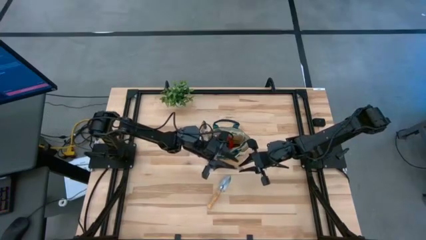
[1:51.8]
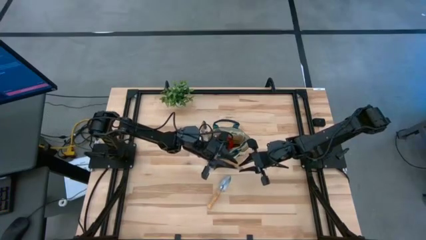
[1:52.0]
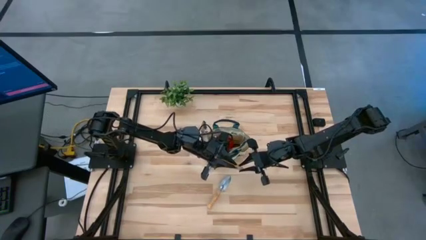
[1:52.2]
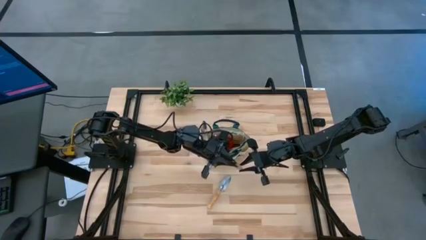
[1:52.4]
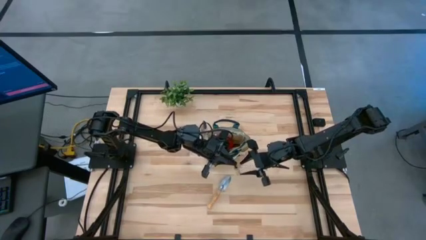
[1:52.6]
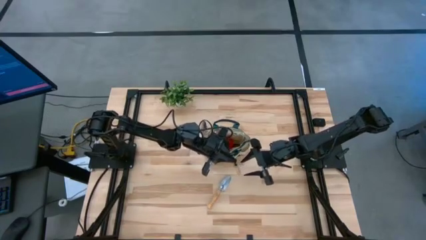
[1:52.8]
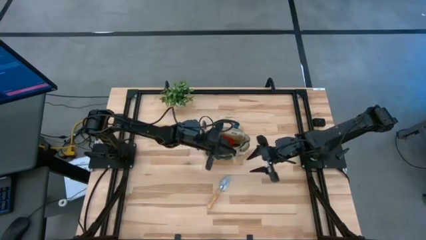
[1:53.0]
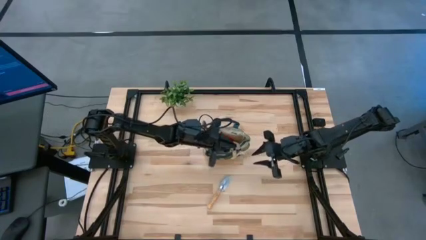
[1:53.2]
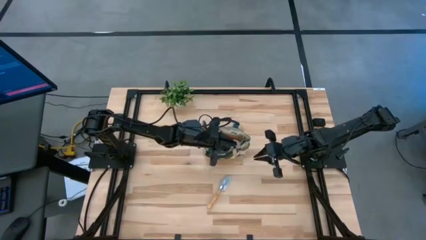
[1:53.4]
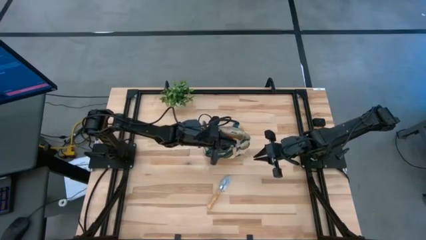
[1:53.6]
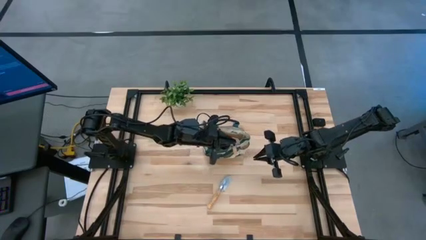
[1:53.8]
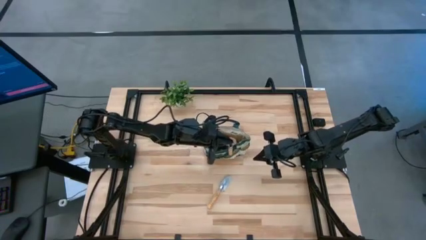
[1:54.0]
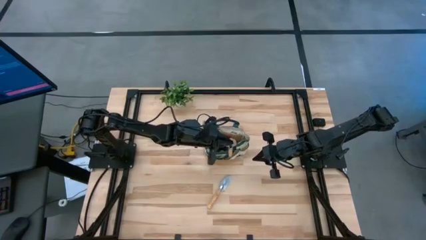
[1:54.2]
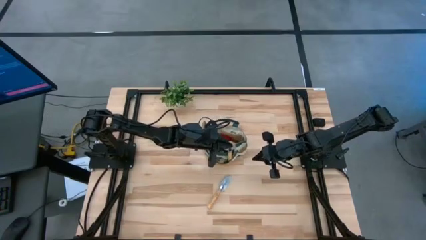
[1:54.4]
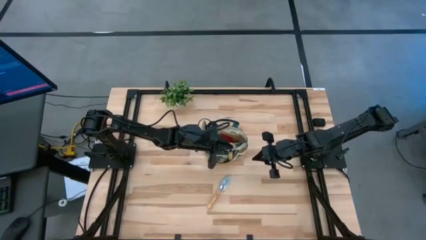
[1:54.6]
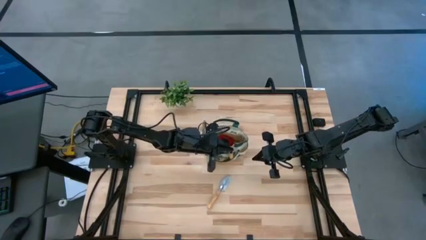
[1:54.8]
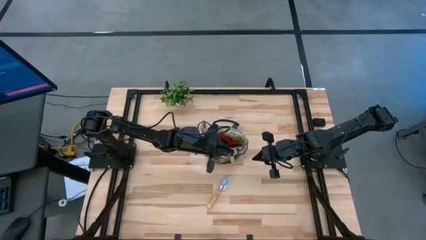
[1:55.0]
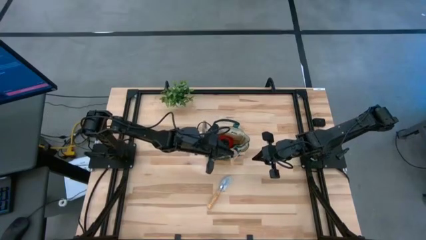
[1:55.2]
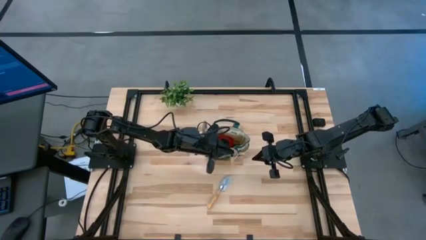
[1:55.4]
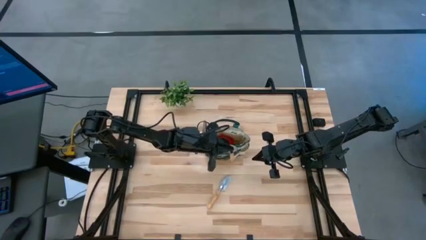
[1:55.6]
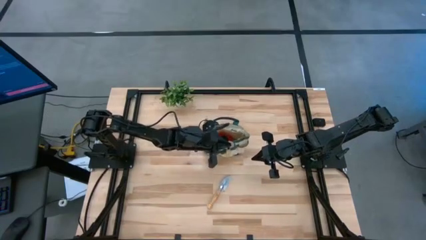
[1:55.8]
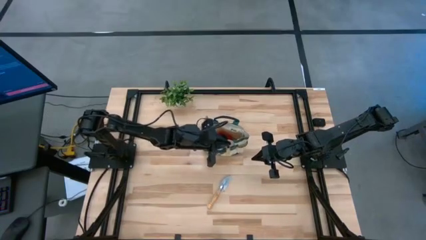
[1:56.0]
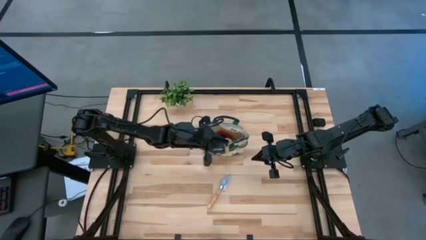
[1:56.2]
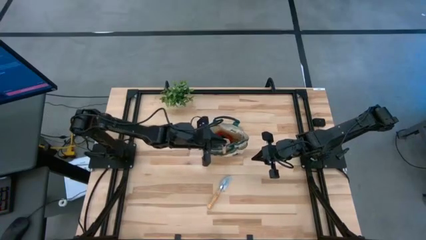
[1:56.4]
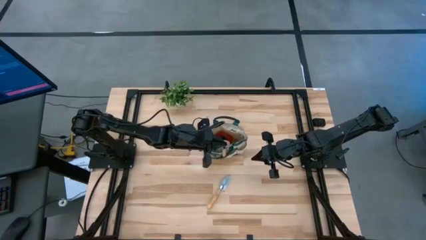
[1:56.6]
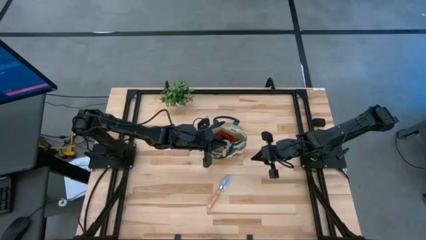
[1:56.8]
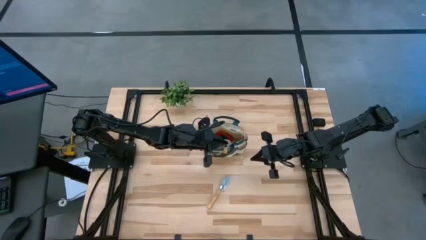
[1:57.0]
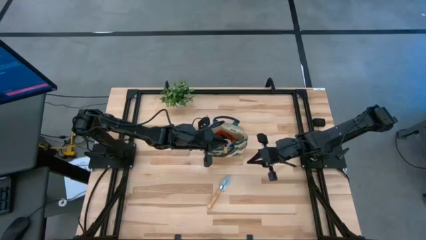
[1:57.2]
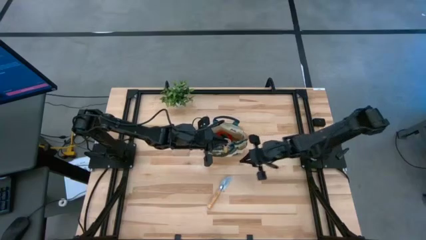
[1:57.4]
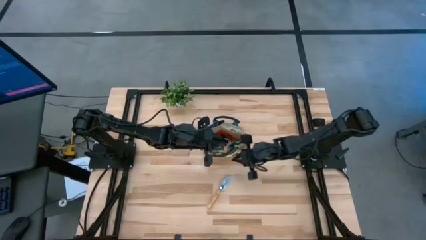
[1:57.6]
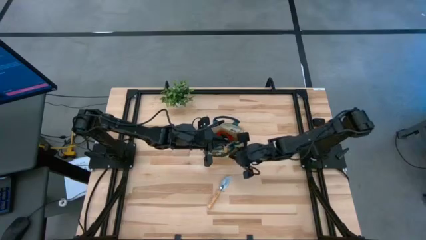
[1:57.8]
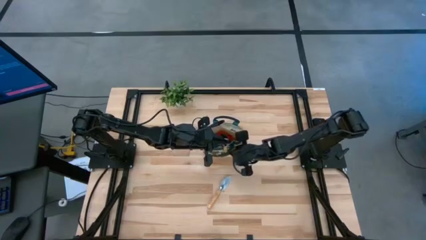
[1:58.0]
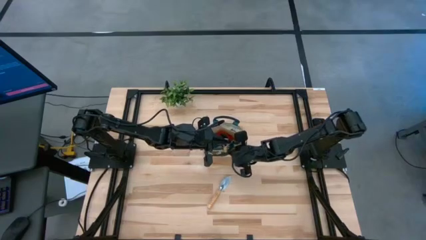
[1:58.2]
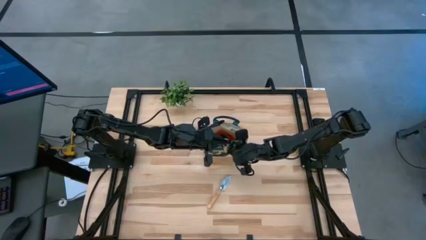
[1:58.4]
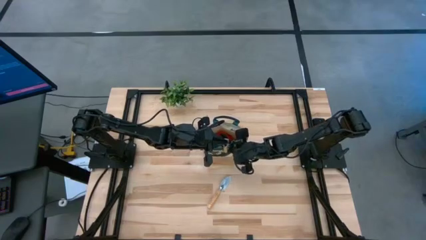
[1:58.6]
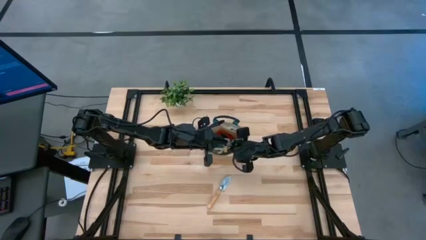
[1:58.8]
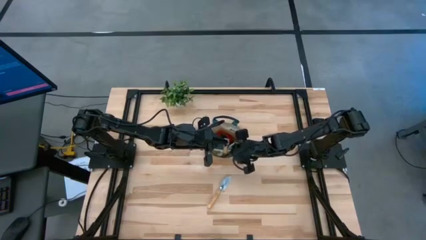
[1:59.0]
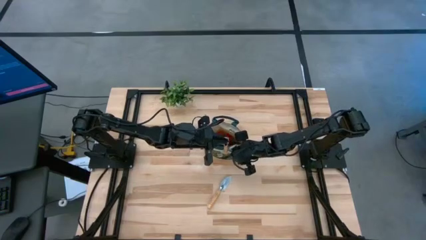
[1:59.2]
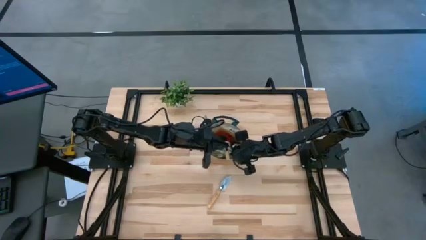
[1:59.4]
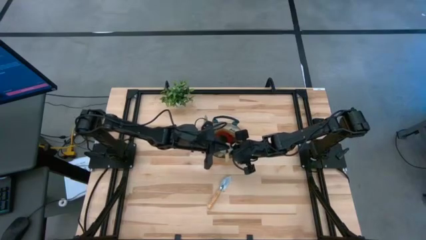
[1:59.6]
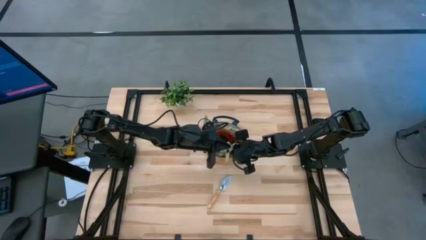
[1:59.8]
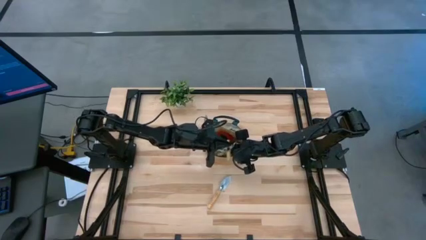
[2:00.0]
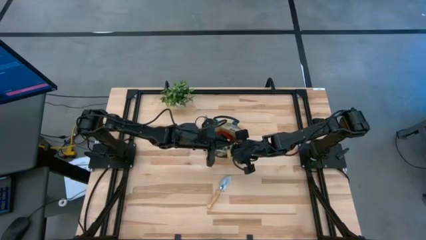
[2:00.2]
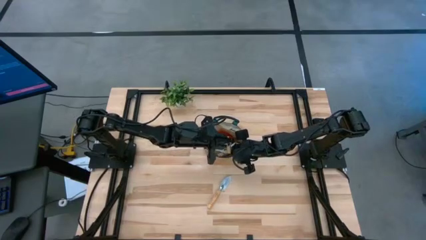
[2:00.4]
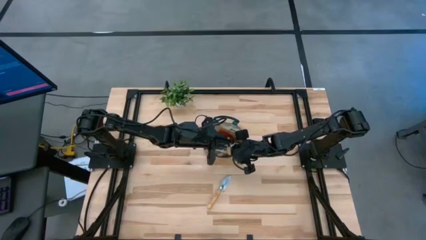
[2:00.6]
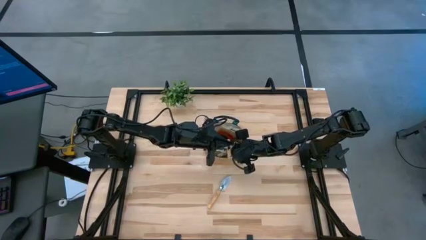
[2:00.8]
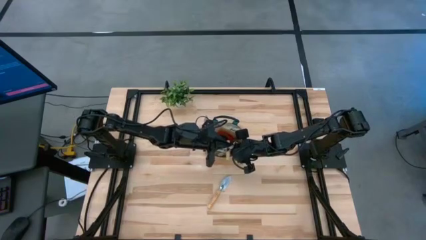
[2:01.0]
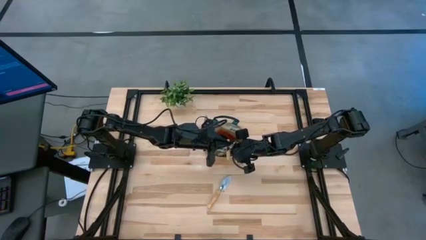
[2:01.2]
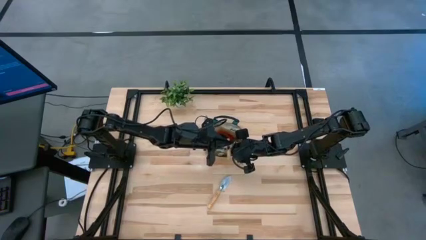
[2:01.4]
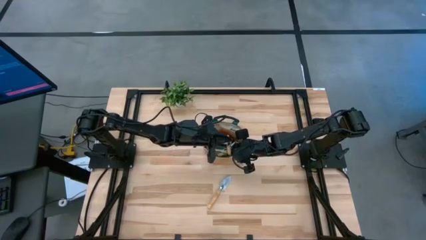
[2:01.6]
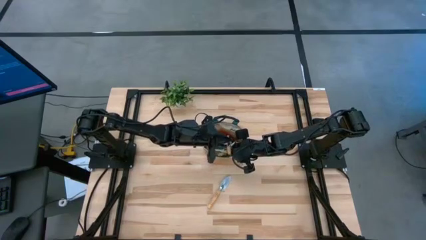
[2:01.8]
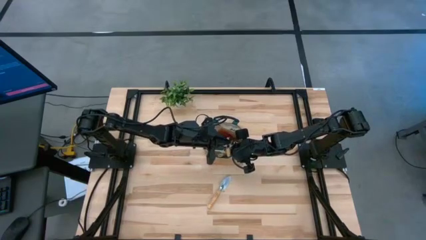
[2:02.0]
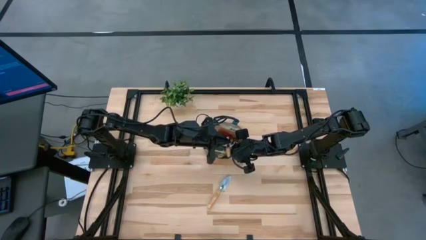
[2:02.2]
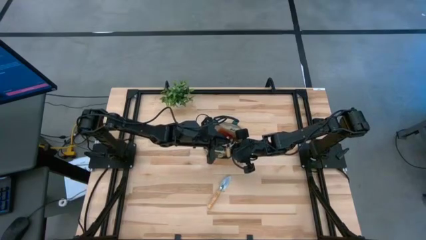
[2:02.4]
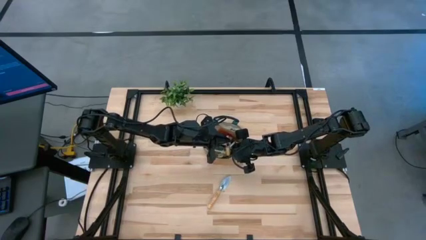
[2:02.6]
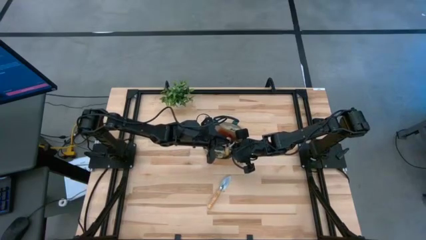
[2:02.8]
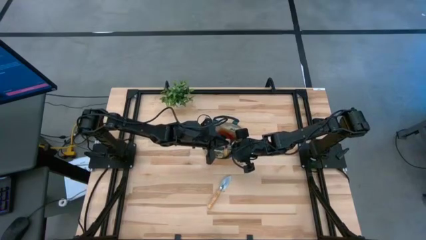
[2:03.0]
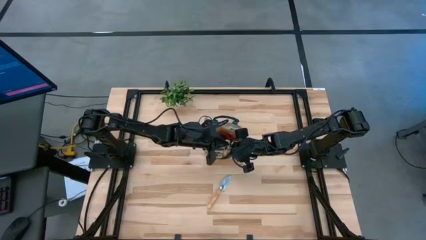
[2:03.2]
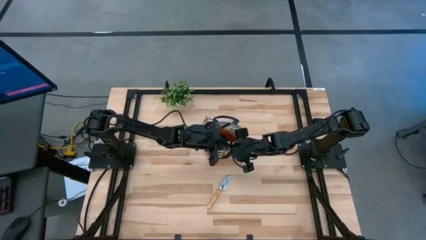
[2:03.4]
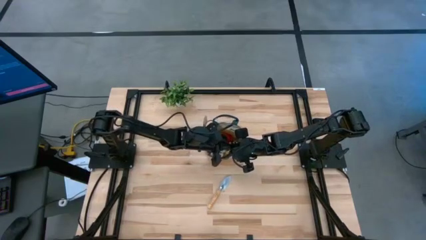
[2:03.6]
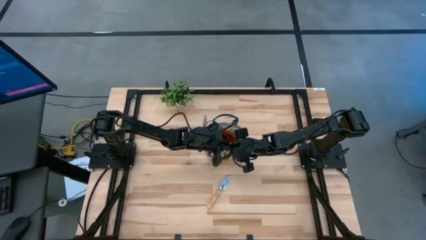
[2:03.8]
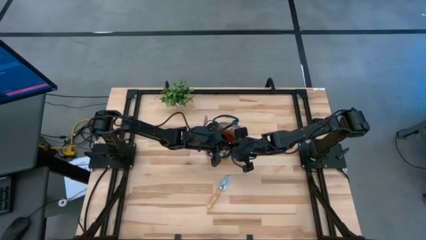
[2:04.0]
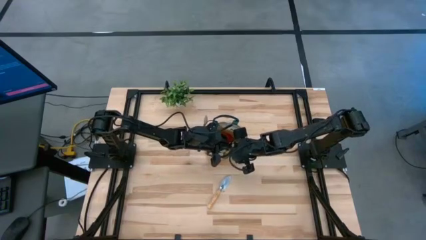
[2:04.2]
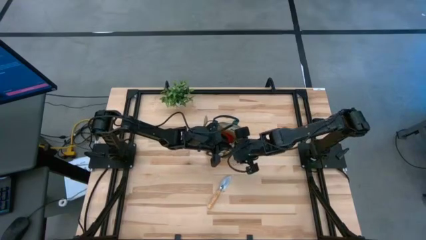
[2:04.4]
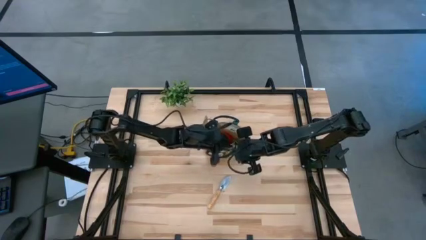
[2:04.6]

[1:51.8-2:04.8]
Task: Pick & Place Garden tools in Gardening bag
Put the trowel into the gardening bag

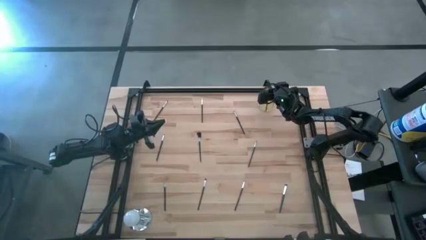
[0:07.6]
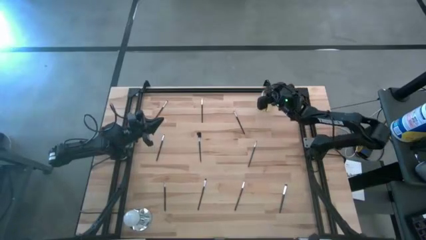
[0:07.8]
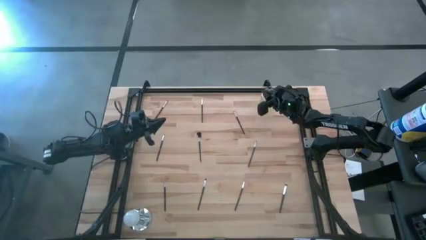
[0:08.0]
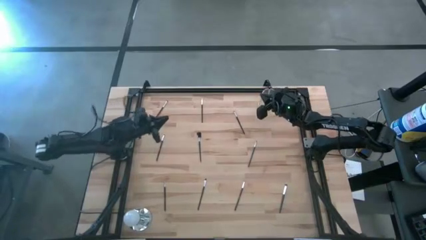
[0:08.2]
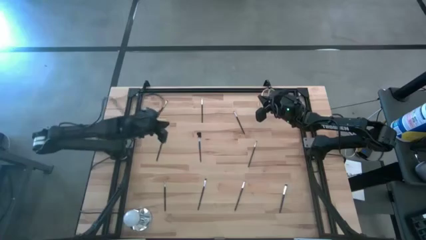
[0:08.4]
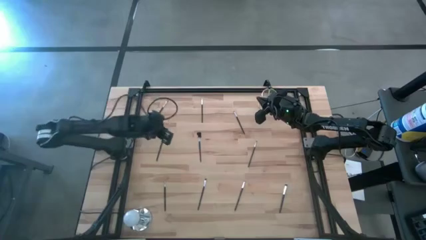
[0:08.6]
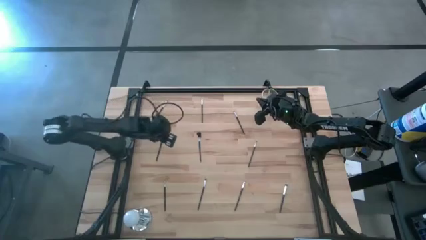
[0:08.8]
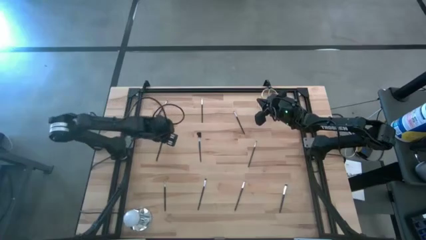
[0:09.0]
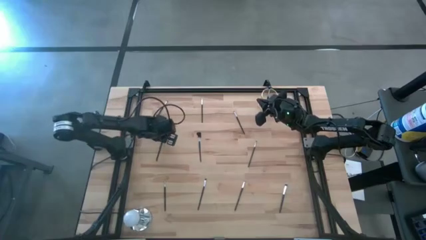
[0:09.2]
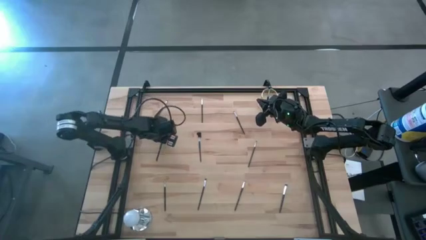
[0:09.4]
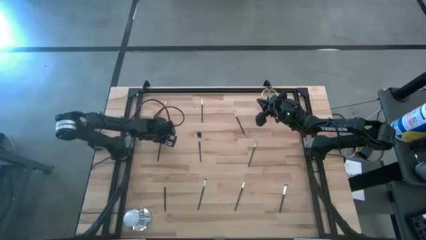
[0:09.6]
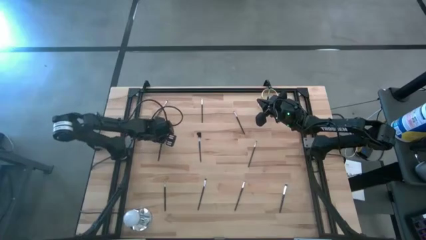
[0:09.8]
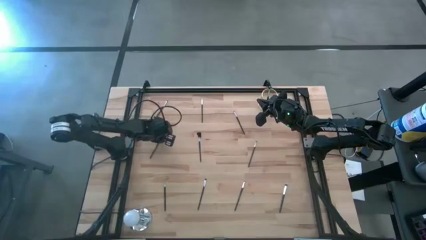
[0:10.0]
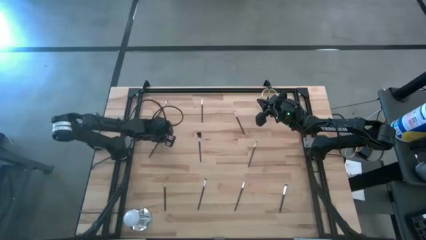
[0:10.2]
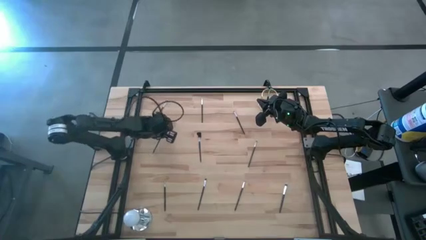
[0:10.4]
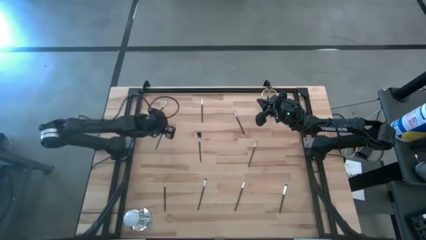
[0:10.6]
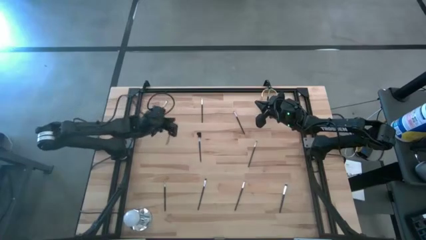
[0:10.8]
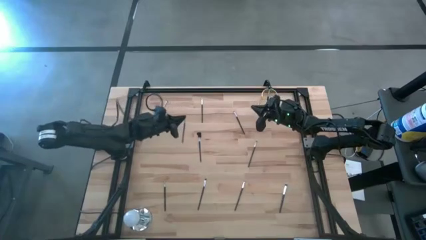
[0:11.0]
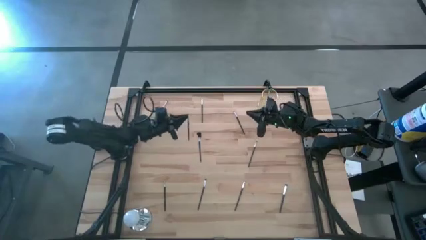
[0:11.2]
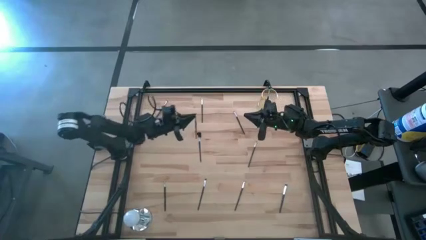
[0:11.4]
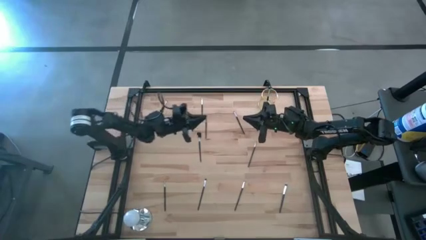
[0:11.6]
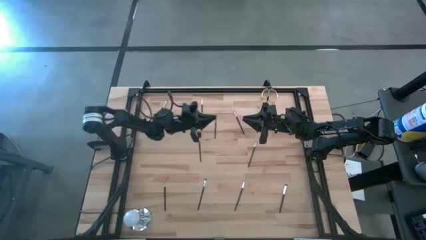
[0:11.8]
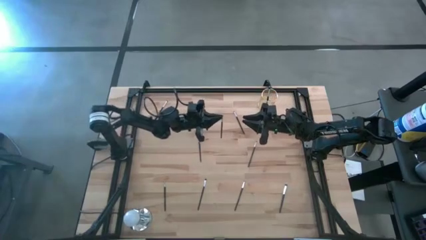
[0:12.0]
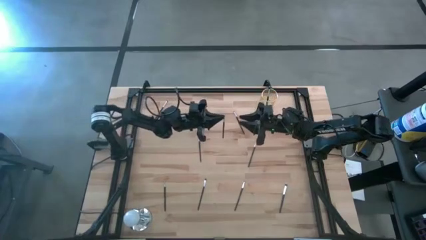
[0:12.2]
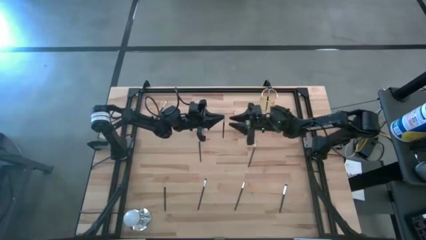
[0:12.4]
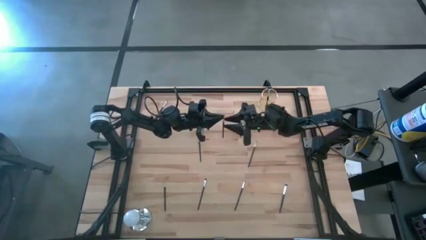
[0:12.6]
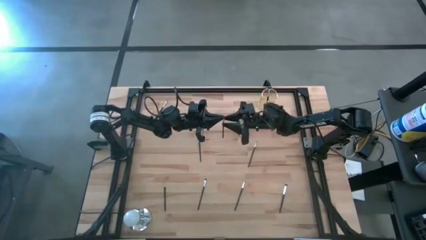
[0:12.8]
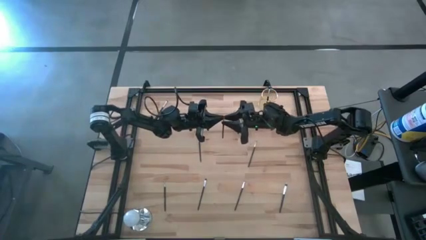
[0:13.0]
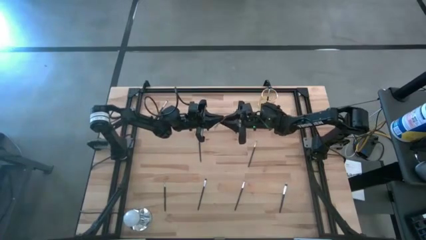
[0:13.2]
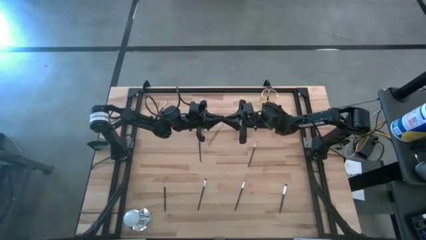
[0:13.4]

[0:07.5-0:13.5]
Task: Put items in baskets/containers
Put the black eyebrow brush into the gold pen holder
